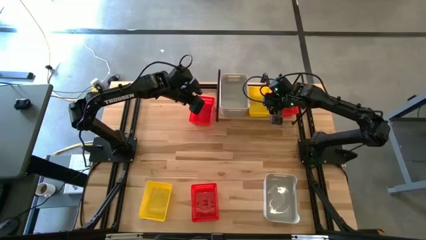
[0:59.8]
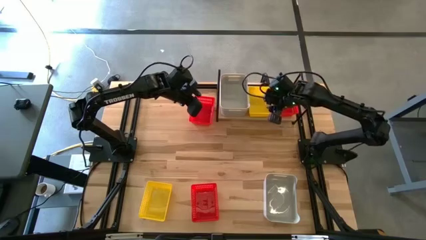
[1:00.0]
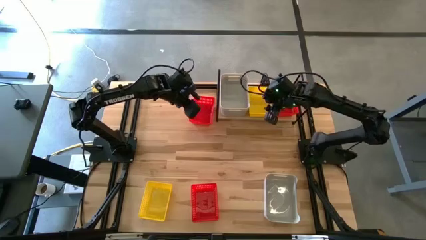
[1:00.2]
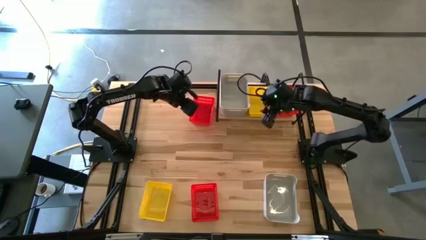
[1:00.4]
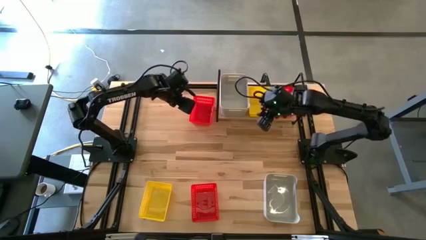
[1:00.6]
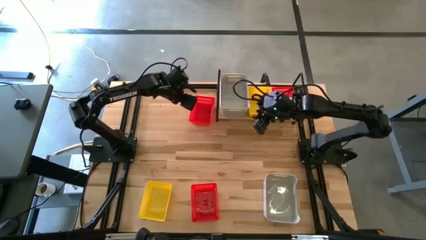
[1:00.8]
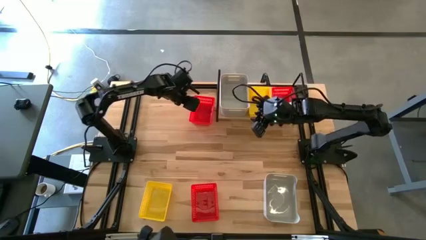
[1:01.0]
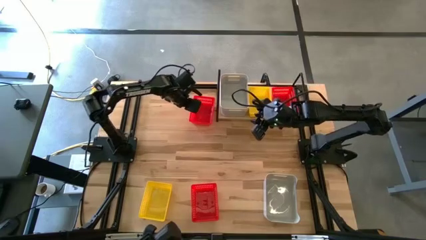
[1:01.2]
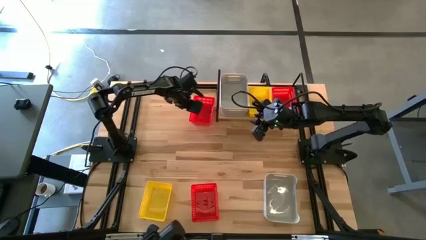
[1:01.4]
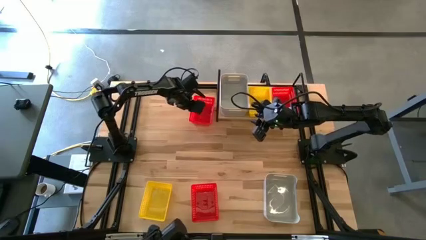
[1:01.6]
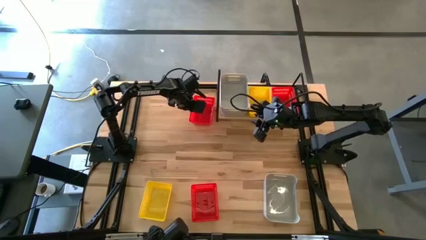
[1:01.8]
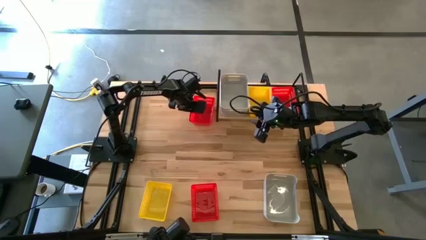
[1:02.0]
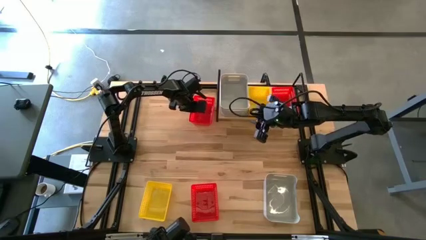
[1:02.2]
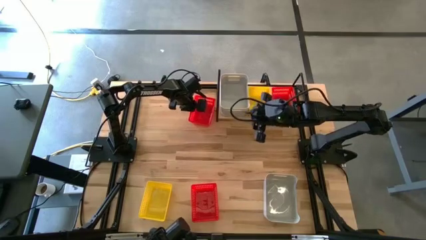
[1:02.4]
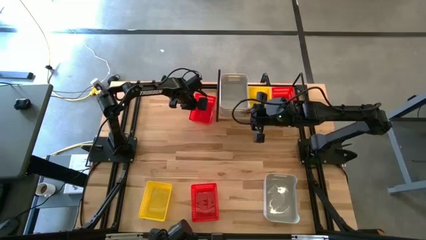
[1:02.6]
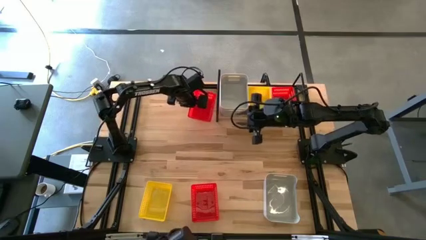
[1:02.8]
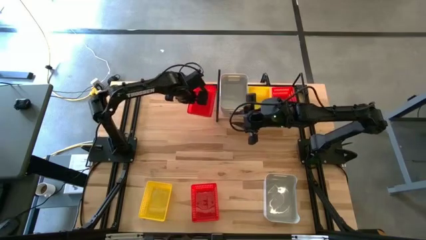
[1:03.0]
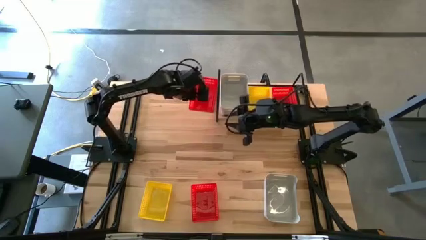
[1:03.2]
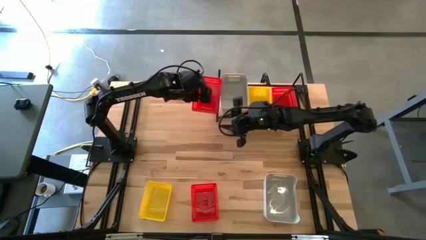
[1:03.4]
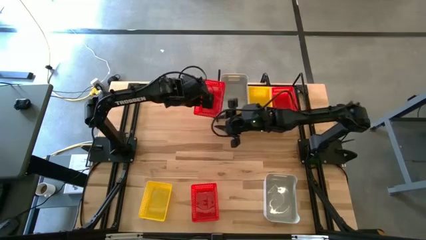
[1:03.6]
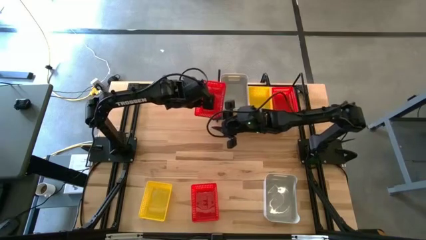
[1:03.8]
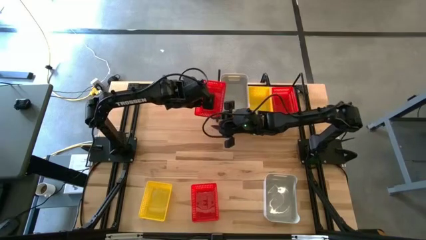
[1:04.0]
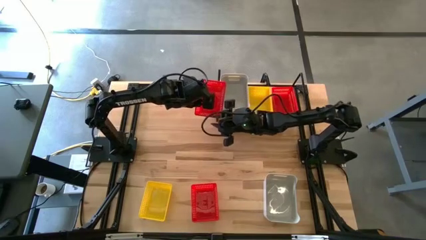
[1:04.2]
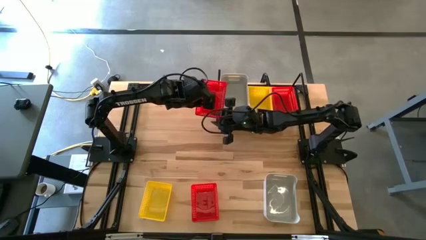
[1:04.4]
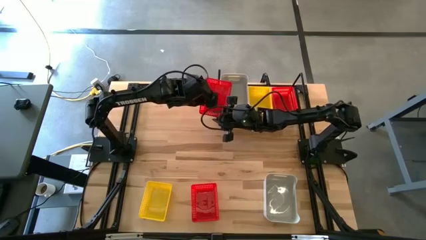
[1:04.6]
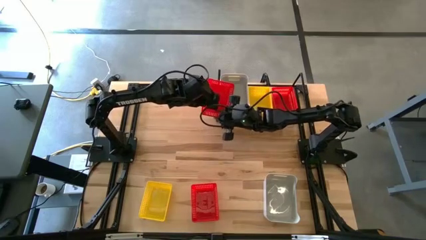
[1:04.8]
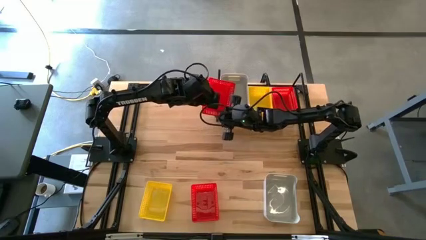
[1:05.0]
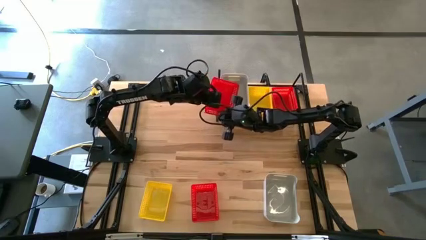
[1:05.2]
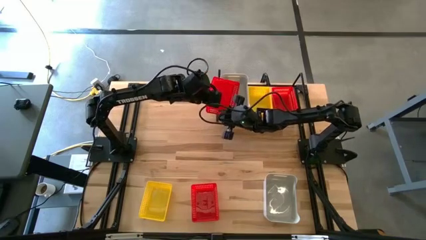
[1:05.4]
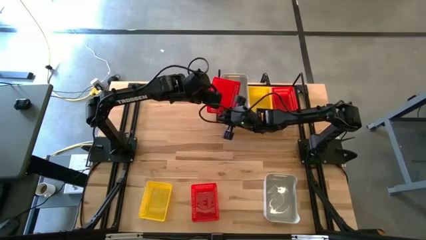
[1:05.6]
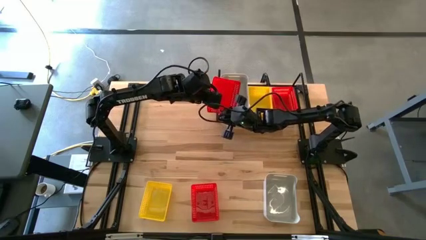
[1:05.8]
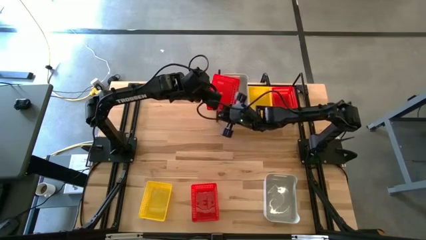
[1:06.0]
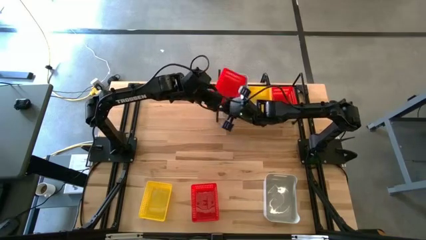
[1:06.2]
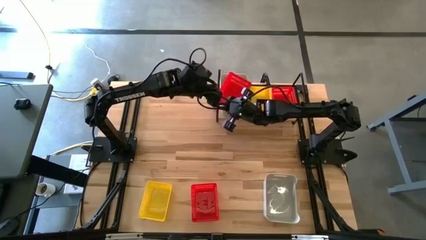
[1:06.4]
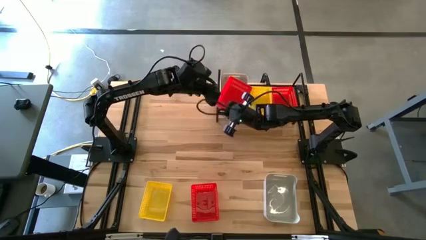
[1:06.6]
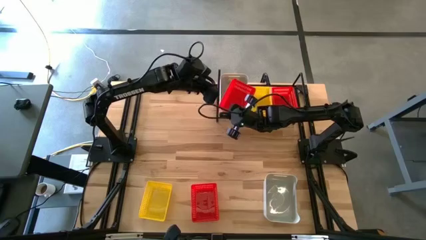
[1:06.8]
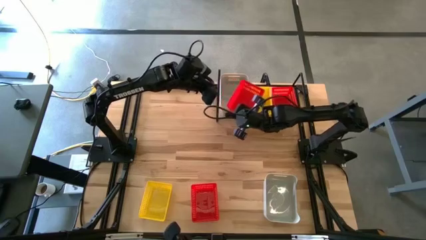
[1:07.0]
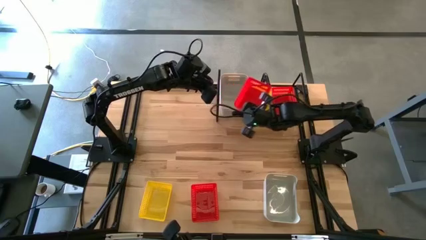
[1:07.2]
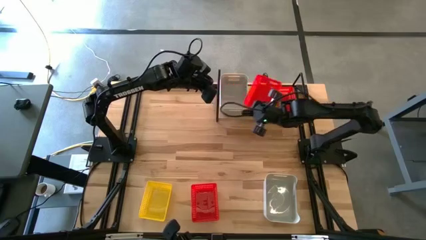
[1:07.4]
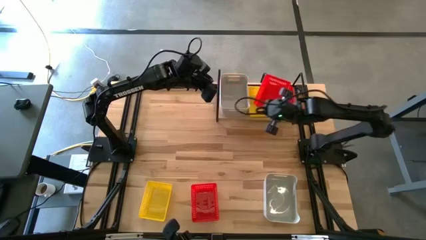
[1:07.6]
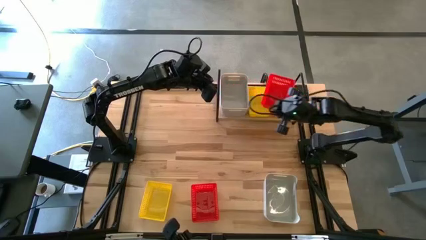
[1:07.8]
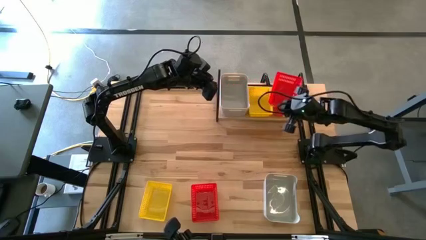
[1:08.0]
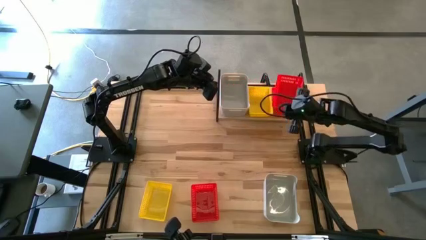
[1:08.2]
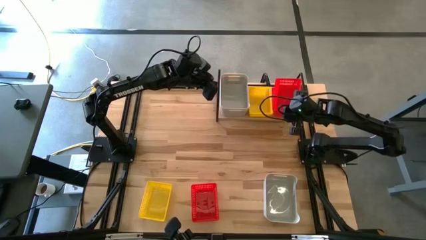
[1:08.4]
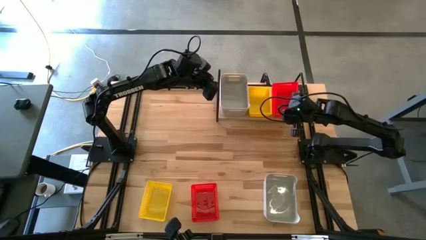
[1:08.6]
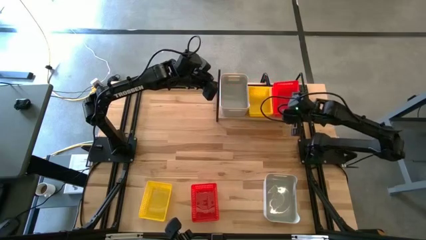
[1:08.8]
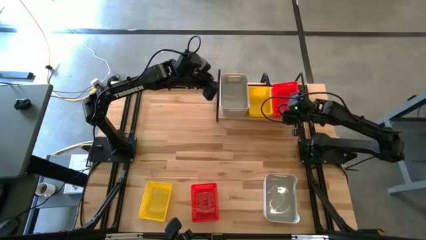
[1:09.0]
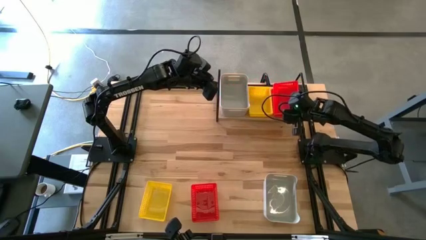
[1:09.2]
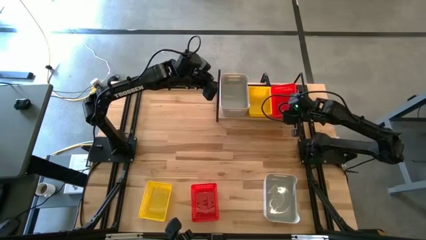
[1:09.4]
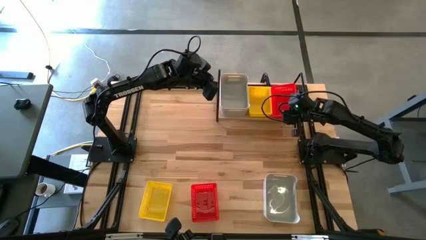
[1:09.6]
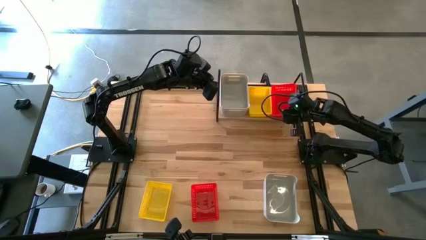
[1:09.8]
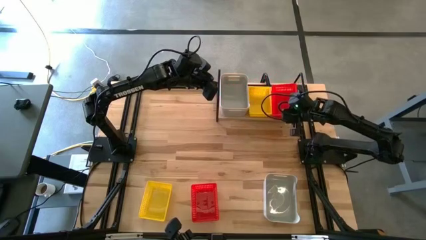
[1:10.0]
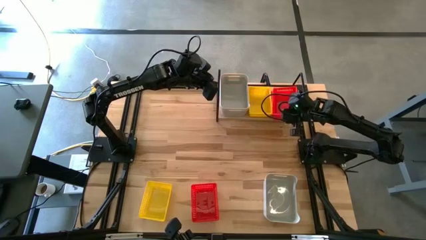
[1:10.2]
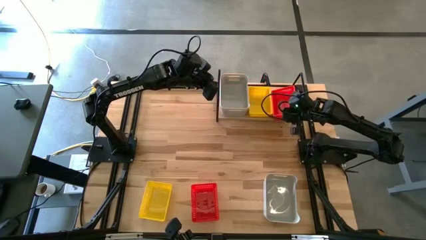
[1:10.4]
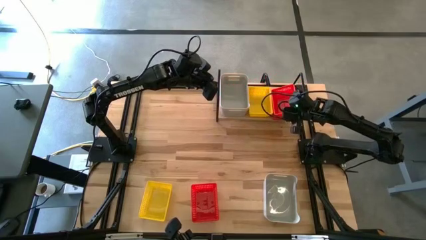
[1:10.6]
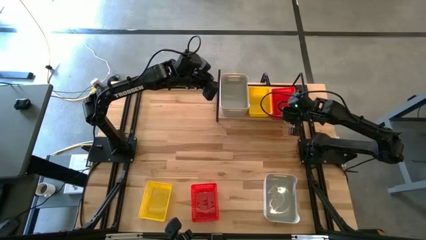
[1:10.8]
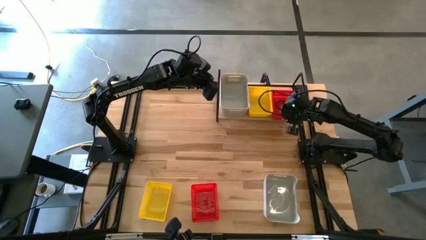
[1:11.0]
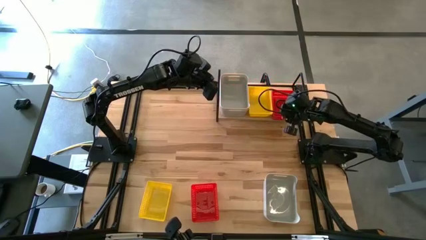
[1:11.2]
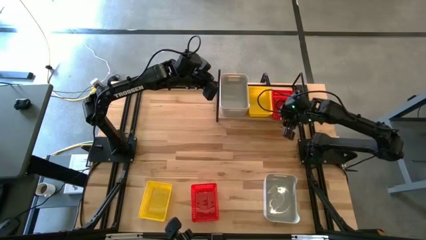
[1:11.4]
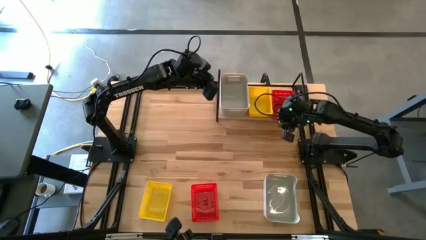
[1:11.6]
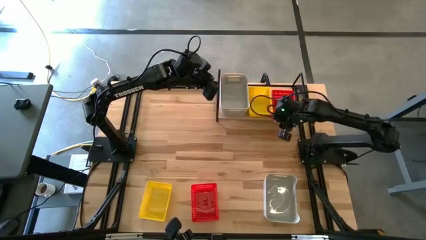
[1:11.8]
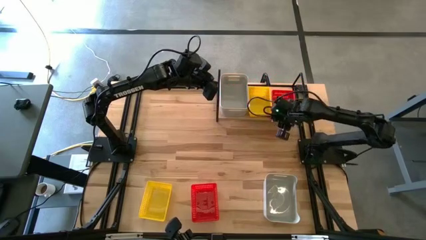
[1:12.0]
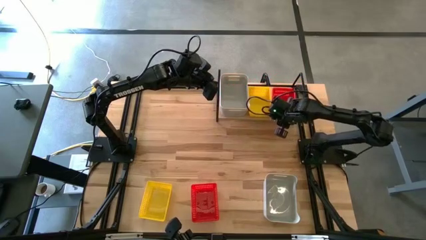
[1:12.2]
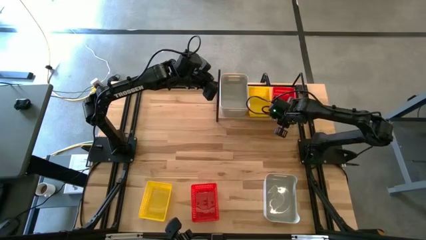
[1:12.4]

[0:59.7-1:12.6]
Task: Stack baskets on shelf by color
Stack the top red bin on top of the red bin on the shelf
